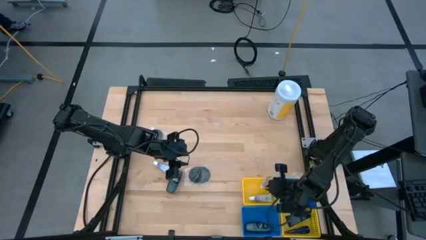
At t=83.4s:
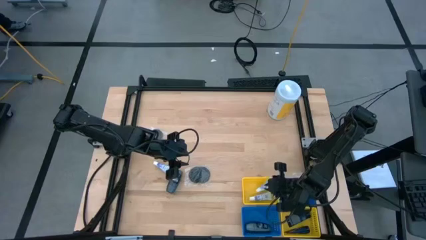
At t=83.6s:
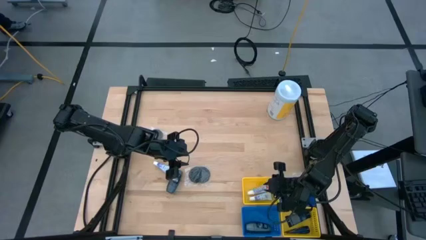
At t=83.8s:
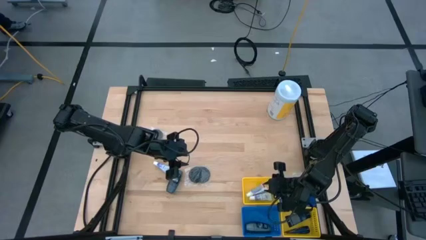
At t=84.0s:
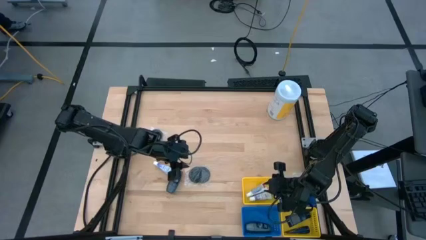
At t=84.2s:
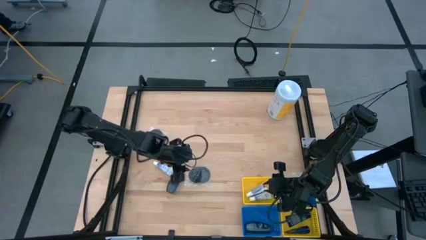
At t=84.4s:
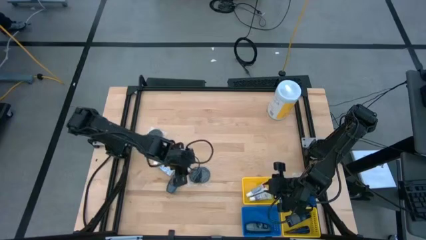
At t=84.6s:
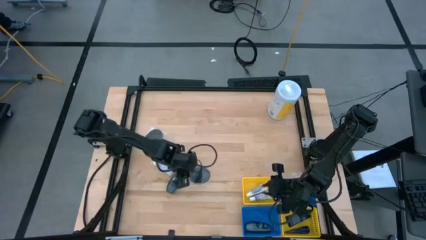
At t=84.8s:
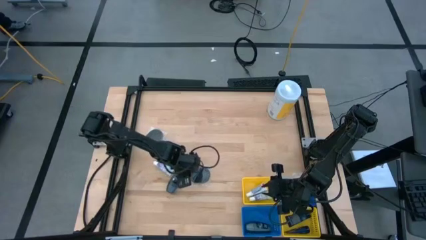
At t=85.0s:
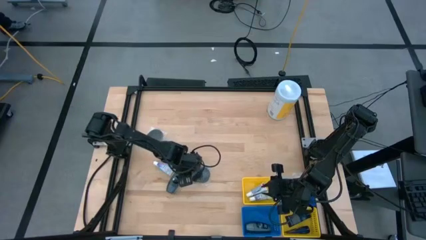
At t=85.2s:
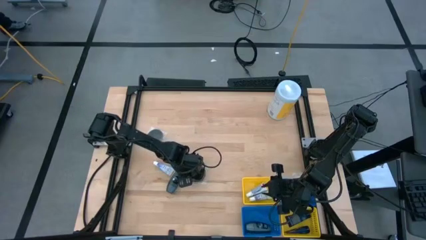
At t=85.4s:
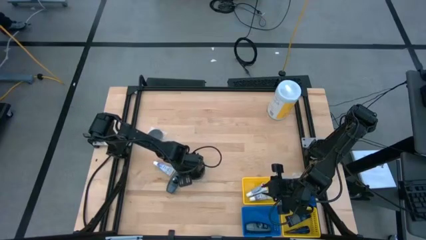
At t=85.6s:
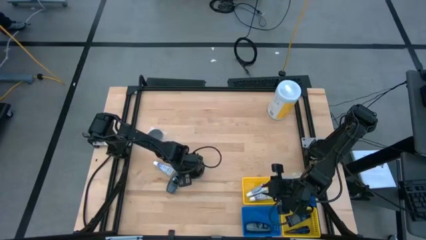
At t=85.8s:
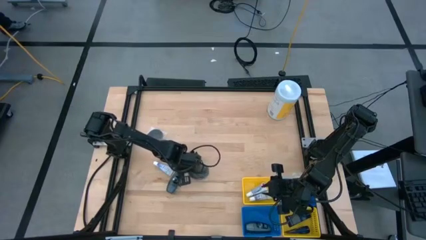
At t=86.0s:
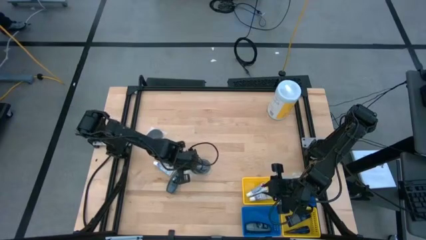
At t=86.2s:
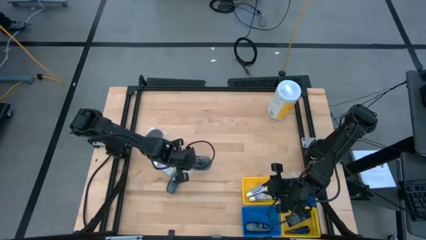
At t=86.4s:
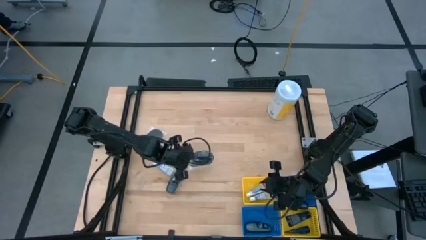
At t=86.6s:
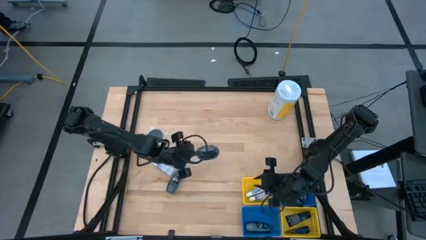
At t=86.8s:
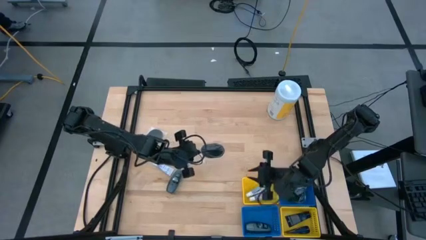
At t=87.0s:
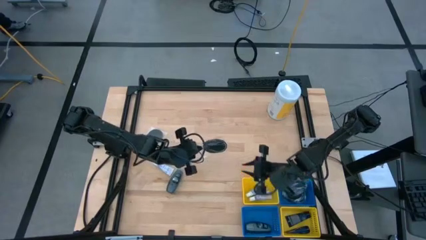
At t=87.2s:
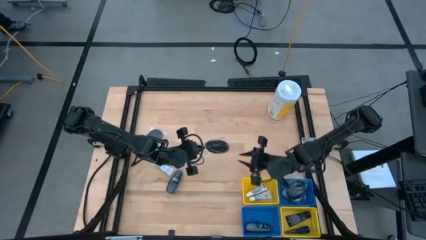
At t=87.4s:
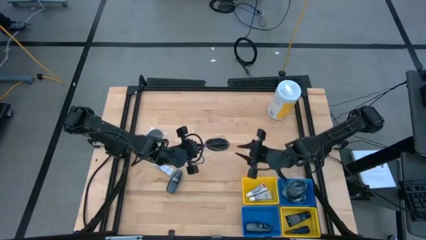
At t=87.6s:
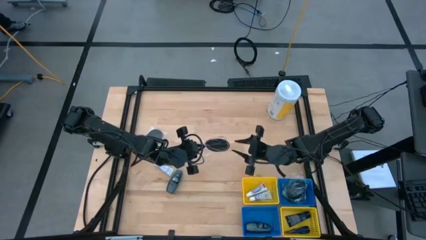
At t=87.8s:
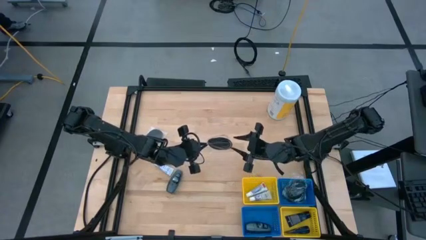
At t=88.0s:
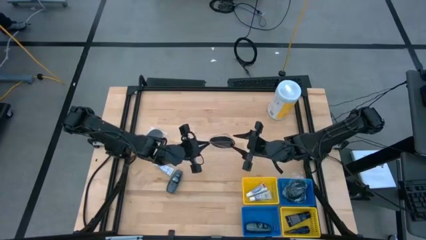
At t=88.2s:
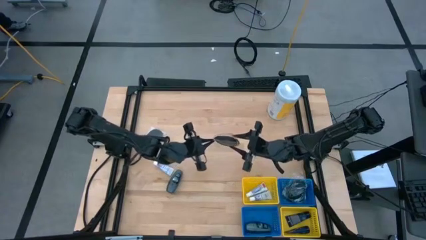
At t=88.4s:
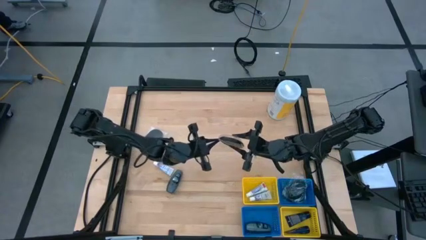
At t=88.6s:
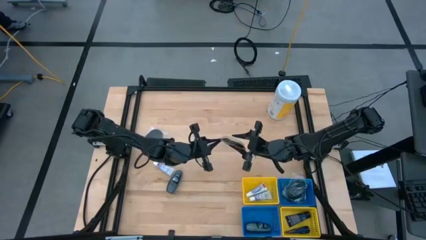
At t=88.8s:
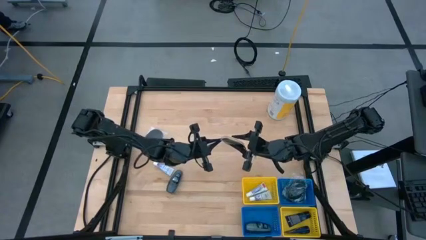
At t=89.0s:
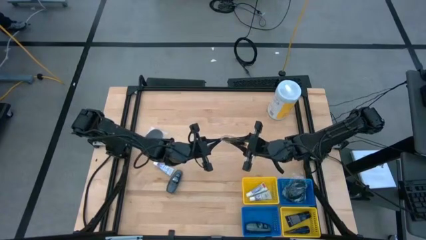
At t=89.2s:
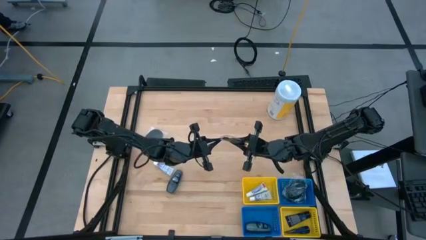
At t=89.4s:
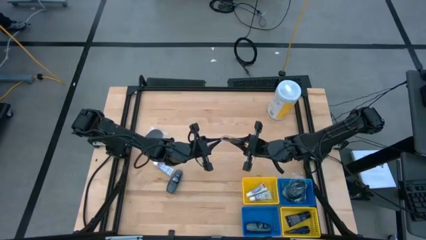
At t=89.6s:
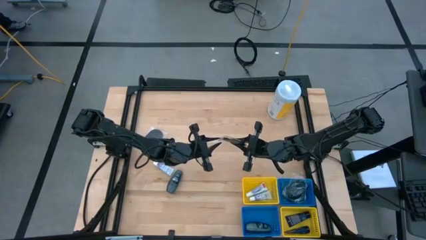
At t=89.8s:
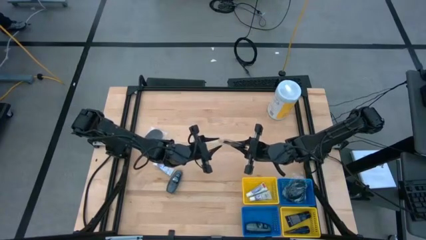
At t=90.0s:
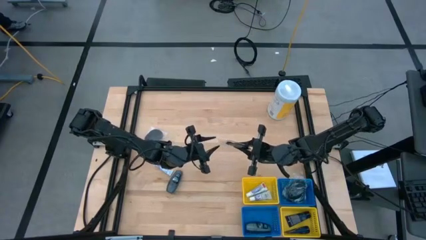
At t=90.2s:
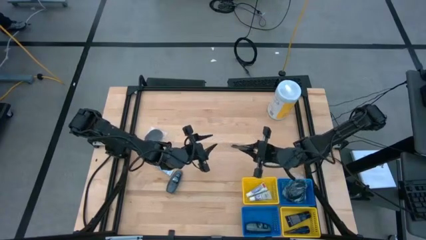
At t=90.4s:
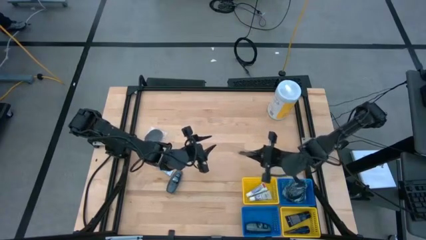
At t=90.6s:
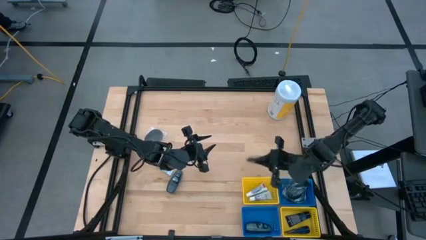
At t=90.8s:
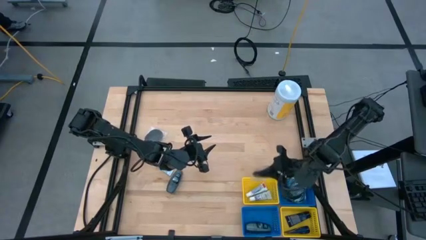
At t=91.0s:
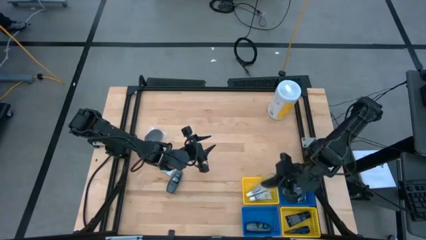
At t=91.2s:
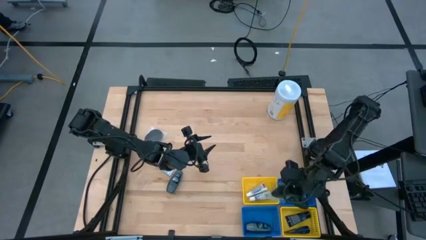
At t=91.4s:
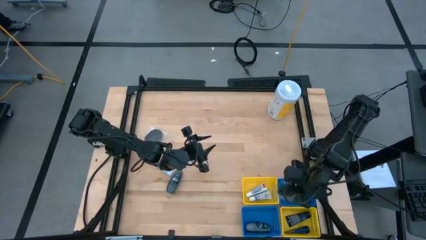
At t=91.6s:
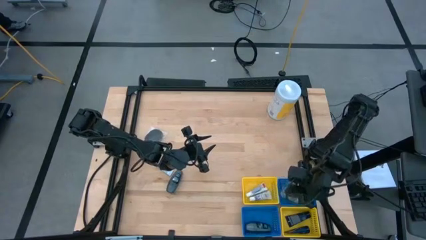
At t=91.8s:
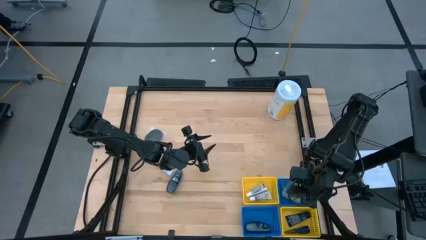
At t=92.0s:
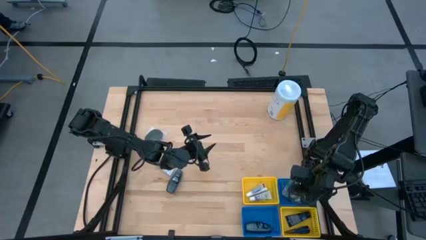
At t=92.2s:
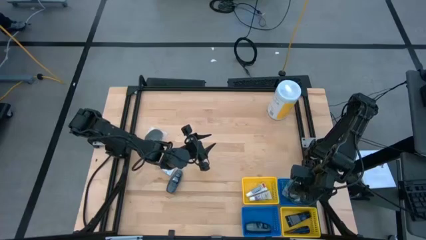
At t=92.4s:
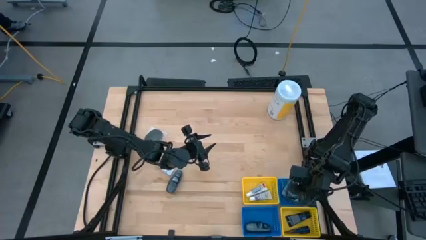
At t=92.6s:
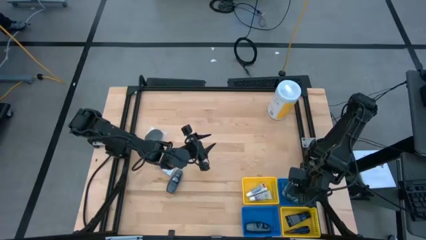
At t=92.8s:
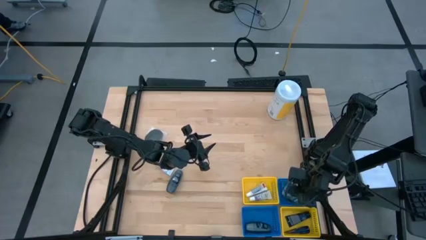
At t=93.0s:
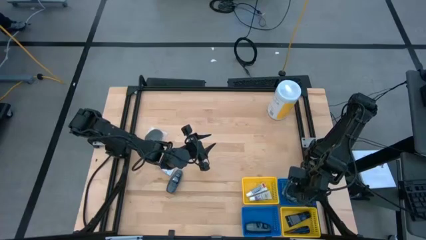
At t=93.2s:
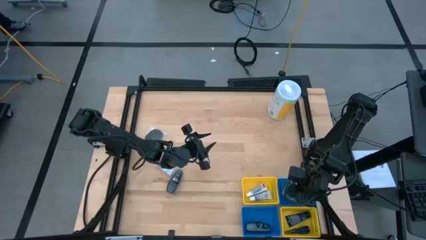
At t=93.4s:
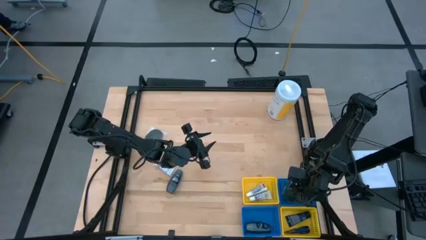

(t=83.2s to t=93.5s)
Task: Pick & Place Travel size toiletries
Put the black hairbrush into the top blue bin

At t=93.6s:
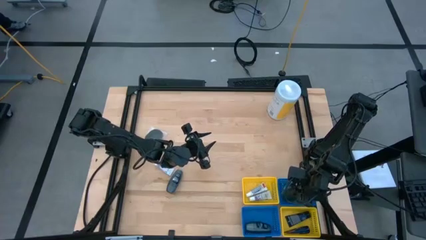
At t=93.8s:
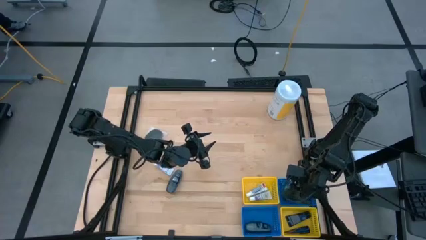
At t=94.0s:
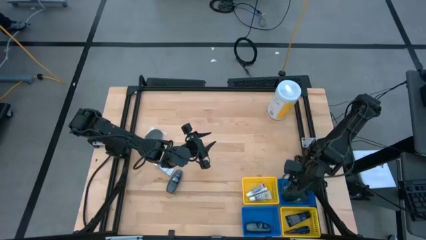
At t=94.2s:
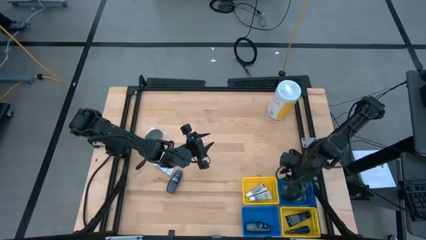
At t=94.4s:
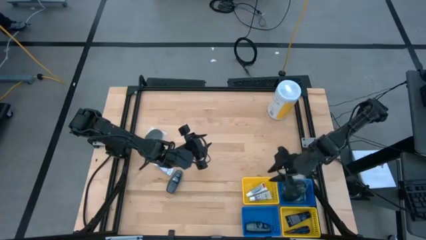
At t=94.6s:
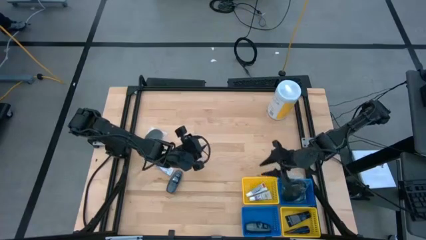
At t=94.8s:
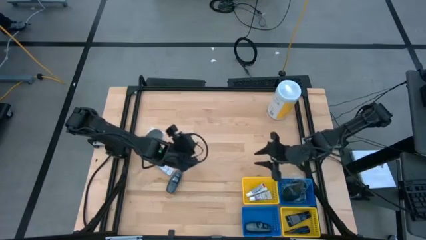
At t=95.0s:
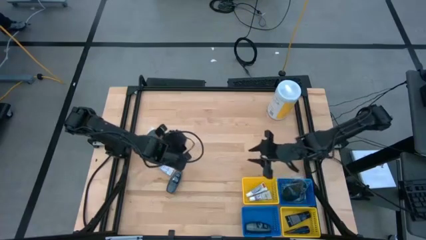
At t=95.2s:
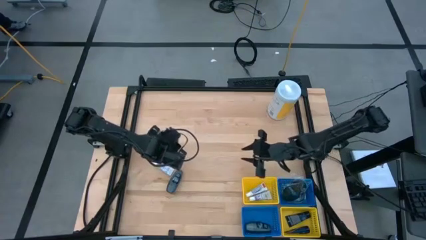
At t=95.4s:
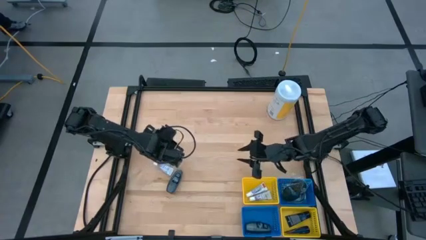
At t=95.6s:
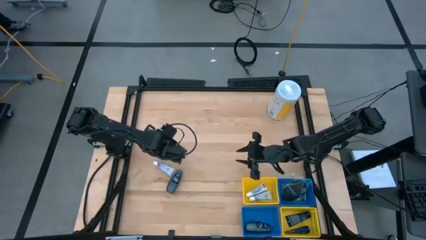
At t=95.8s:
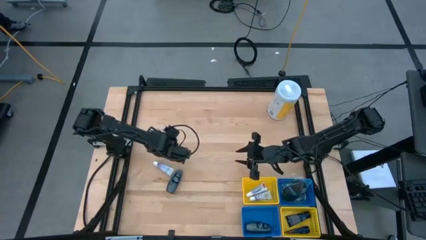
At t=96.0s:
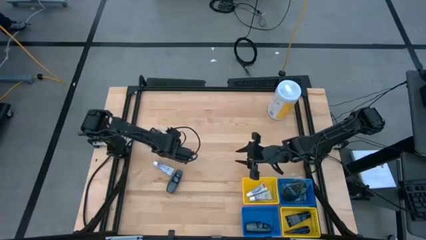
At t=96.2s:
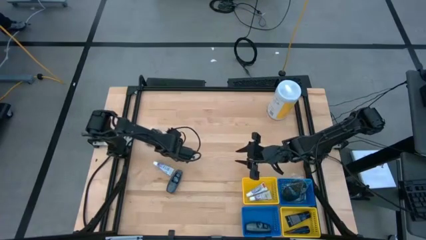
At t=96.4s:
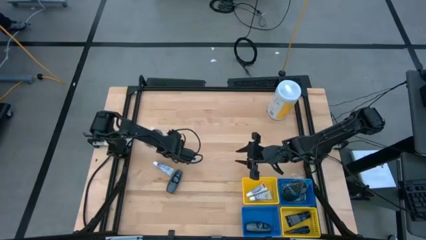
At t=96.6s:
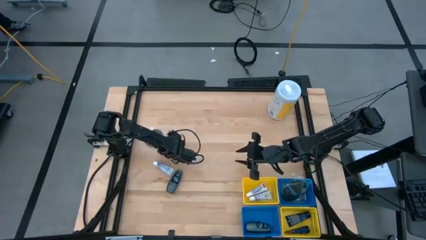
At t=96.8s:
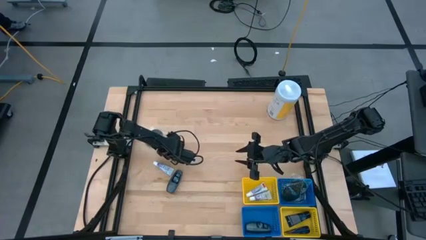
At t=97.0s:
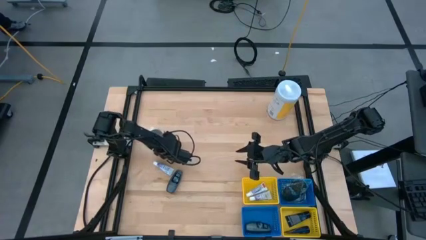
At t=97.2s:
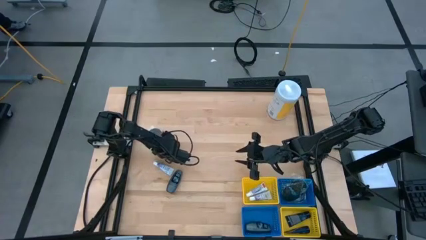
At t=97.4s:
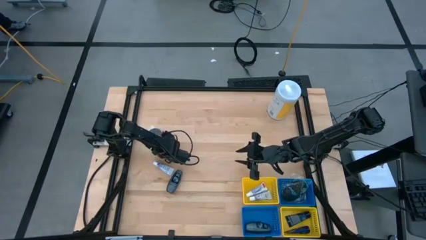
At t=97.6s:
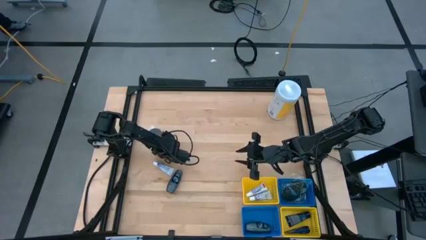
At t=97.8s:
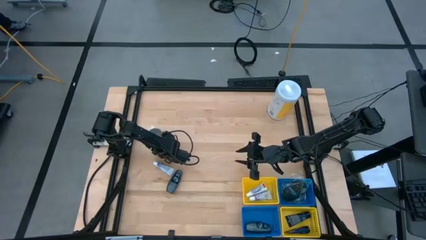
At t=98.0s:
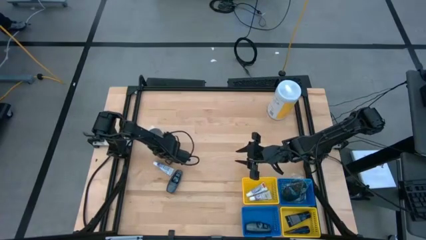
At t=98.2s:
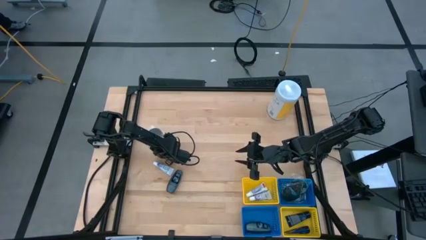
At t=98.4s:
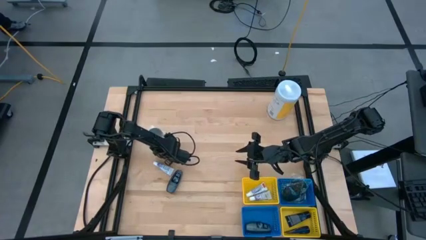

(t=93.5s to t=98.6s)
Put the black hairbrush into the top blue bin

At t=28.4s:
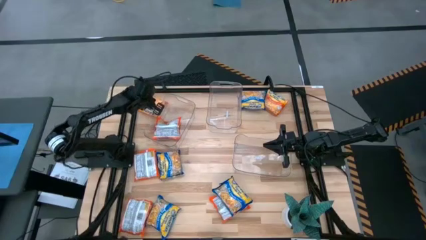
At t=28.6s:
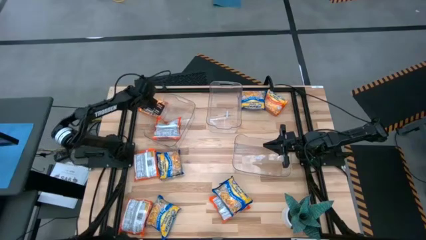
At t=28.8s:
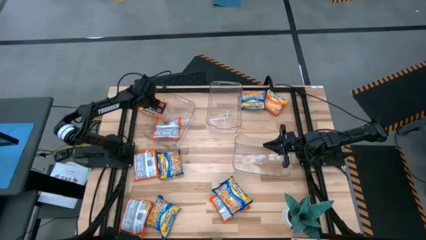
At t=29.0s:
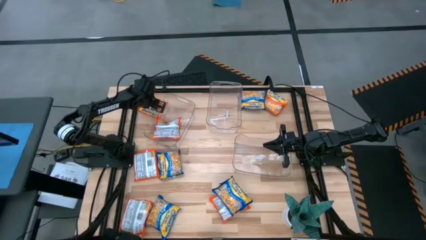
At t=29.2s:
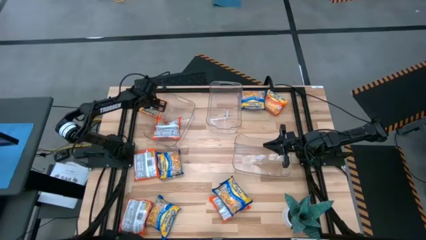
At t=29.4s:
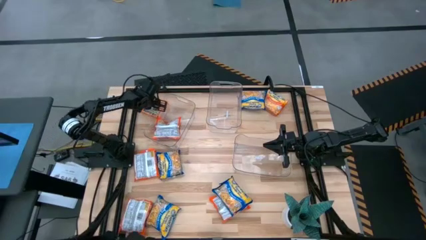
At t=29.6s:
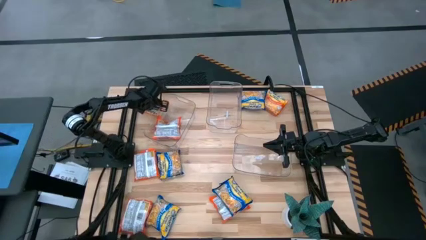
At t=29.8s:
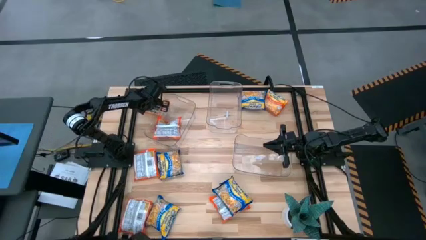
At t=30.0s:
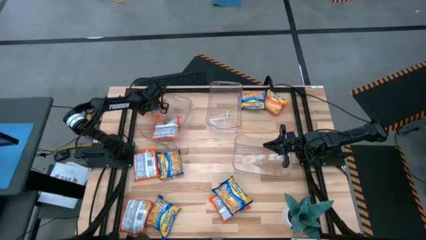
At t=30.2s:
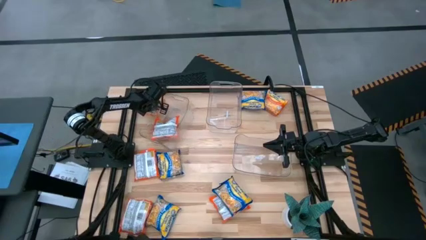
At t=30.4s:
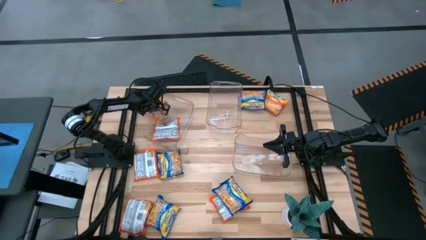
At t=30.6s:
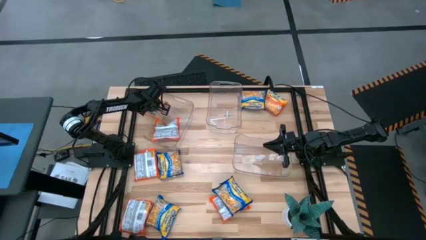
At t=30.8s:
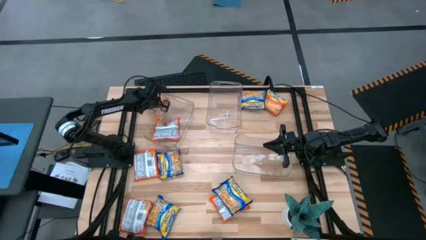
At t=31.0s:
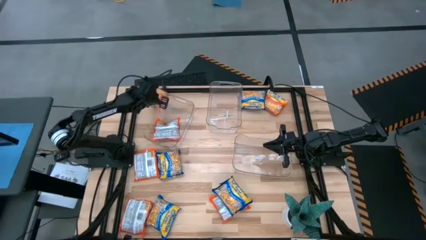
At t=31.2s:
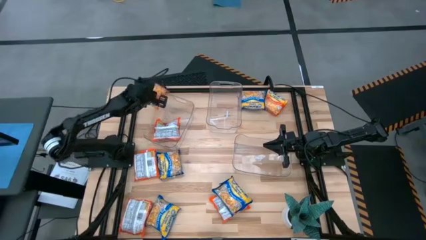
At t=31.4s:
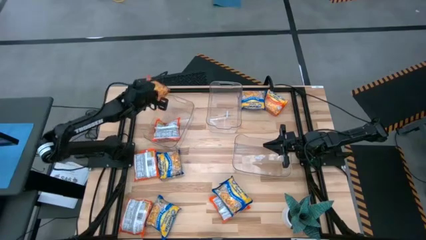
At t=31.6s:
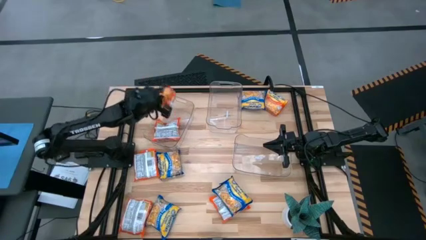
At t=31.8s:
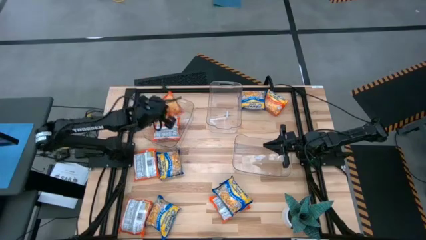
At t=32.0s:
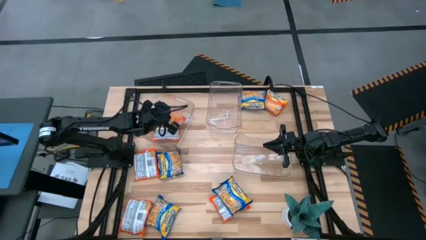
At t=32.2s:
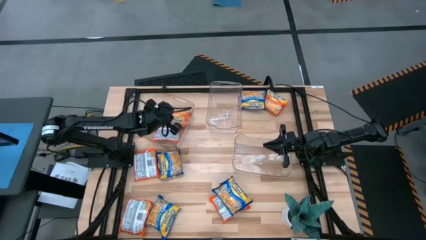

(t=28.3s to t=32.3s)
Task: Sort Maruchan noodles
Put the orange bag into the left transparent bin
